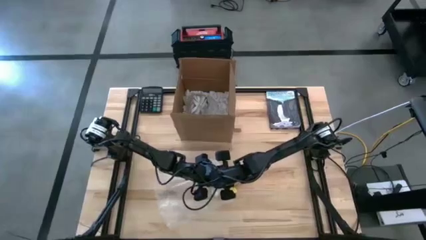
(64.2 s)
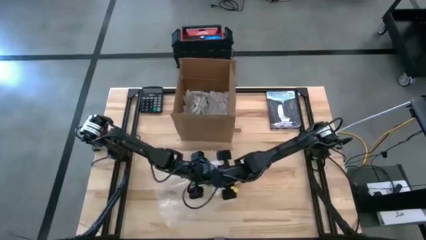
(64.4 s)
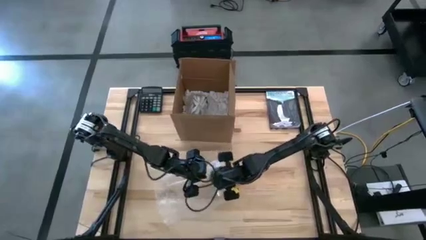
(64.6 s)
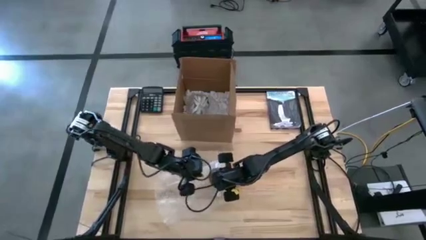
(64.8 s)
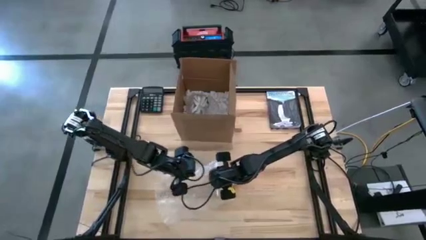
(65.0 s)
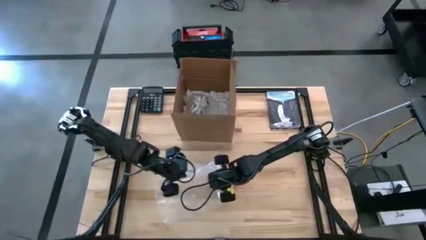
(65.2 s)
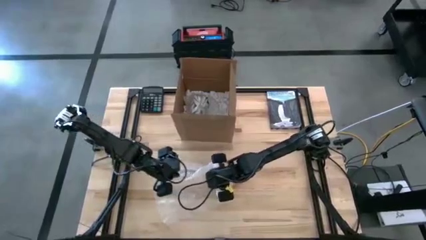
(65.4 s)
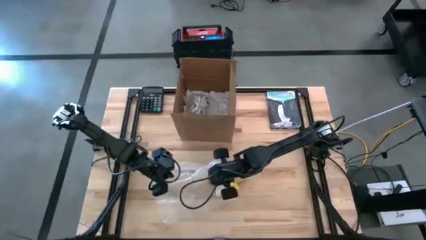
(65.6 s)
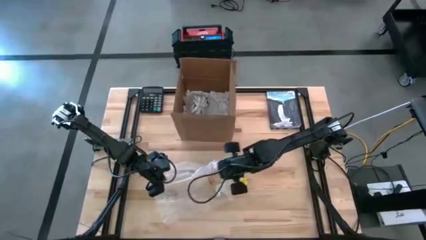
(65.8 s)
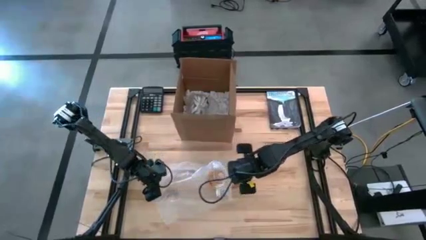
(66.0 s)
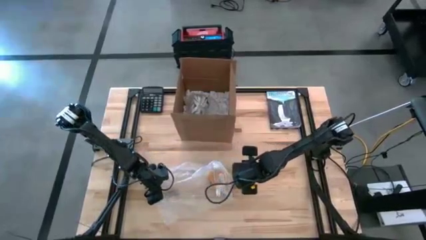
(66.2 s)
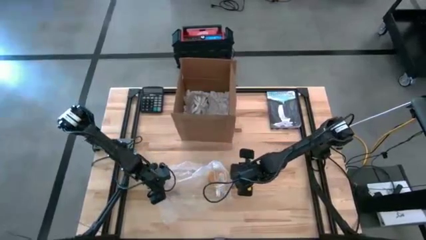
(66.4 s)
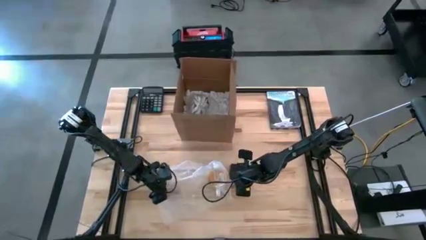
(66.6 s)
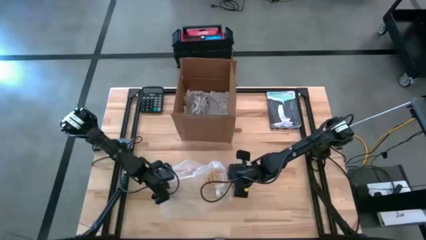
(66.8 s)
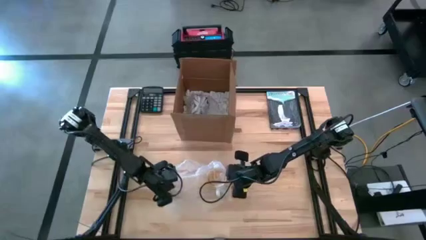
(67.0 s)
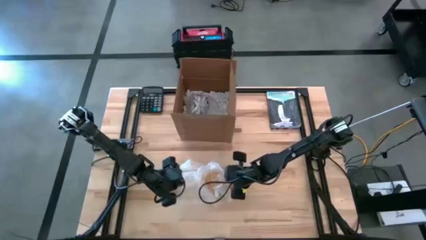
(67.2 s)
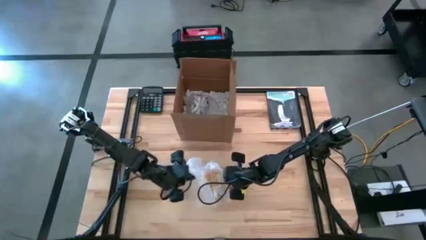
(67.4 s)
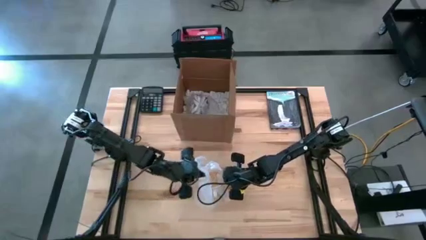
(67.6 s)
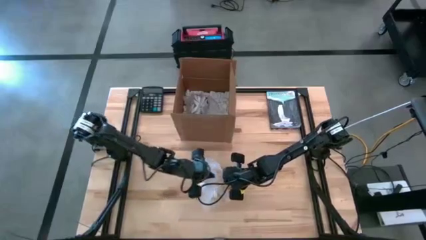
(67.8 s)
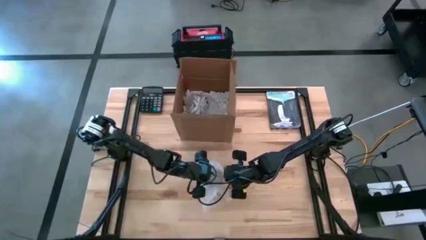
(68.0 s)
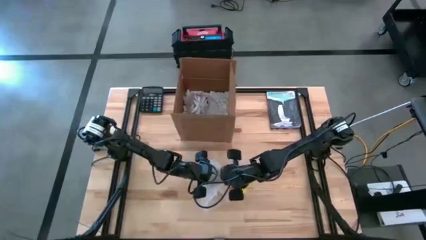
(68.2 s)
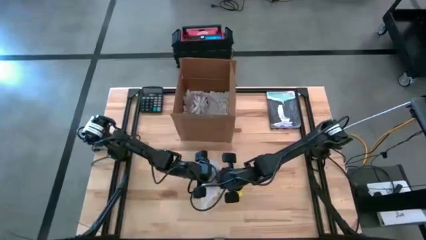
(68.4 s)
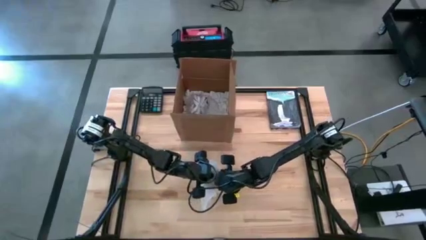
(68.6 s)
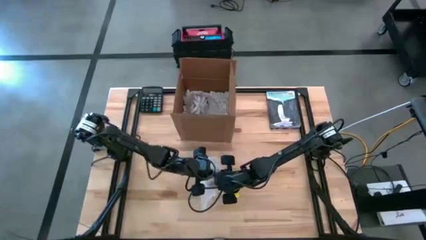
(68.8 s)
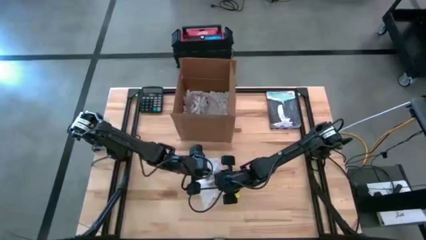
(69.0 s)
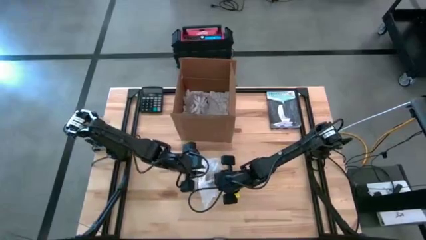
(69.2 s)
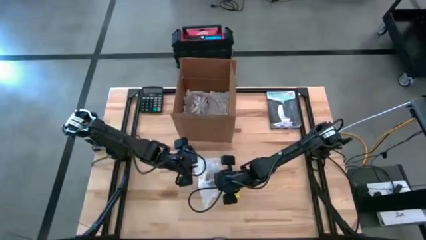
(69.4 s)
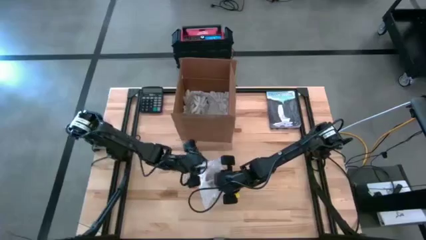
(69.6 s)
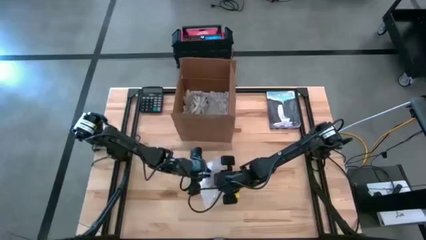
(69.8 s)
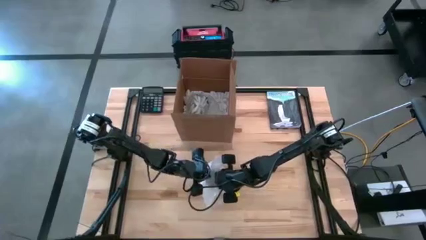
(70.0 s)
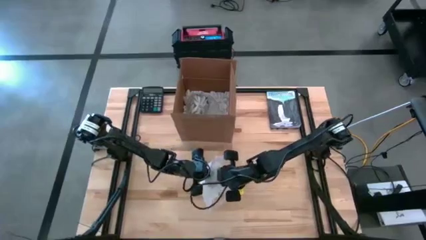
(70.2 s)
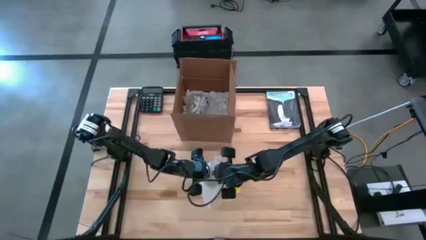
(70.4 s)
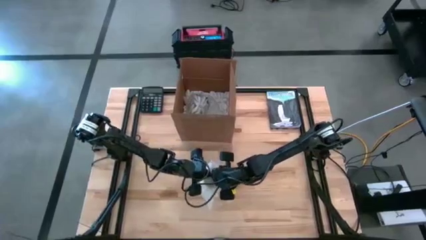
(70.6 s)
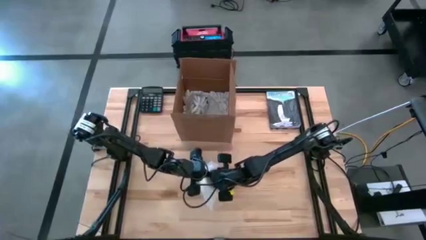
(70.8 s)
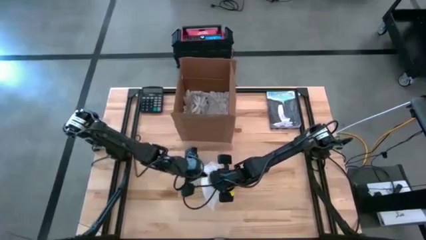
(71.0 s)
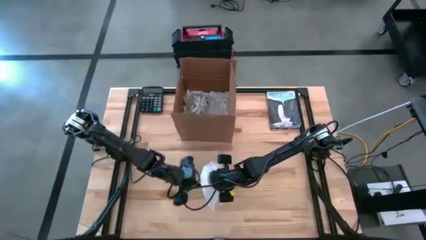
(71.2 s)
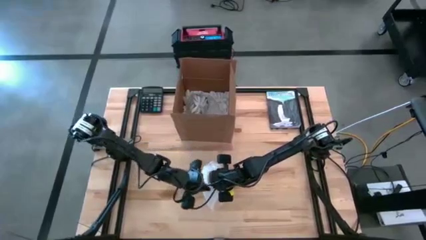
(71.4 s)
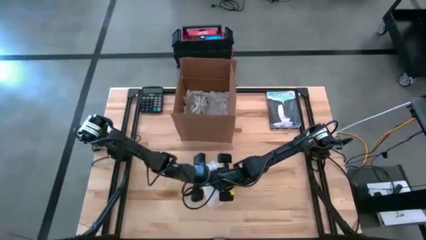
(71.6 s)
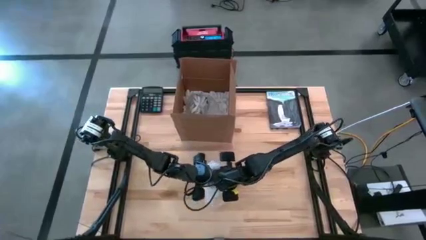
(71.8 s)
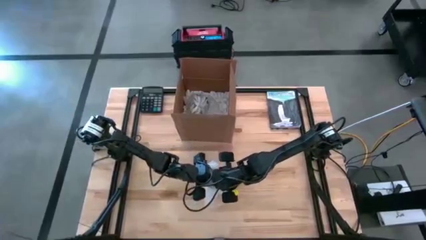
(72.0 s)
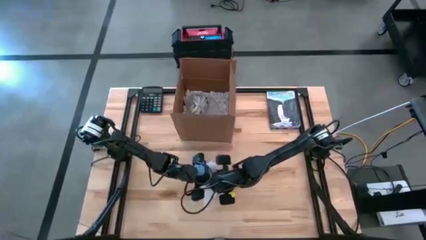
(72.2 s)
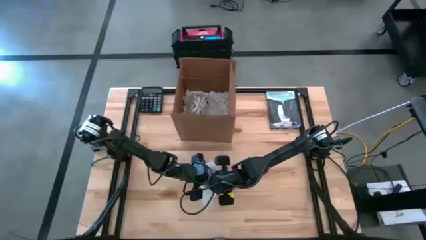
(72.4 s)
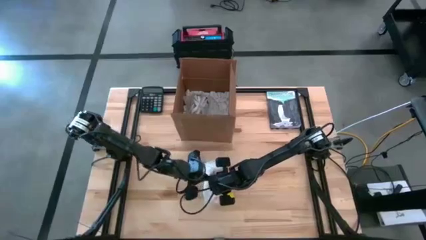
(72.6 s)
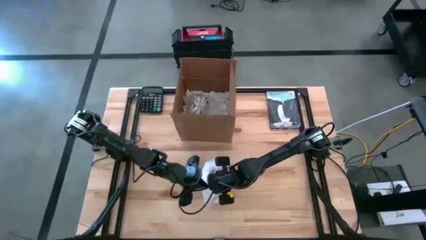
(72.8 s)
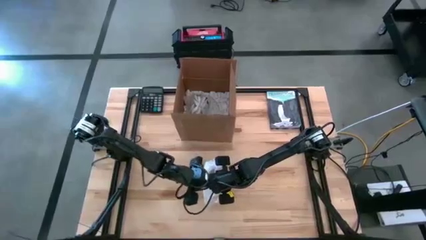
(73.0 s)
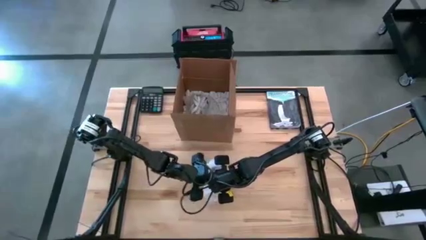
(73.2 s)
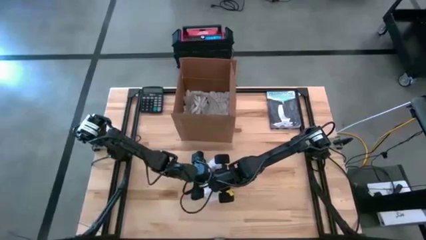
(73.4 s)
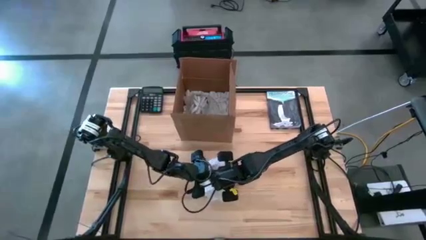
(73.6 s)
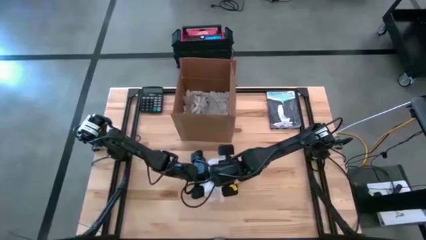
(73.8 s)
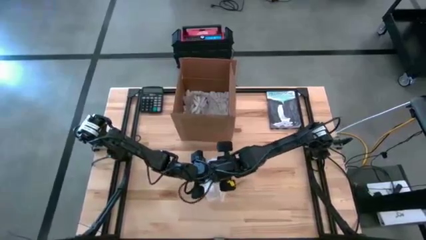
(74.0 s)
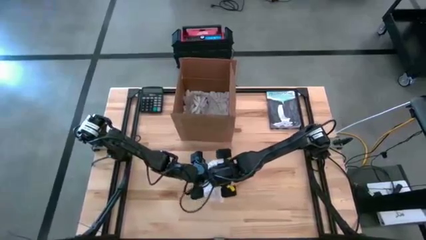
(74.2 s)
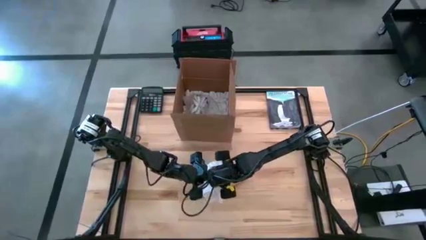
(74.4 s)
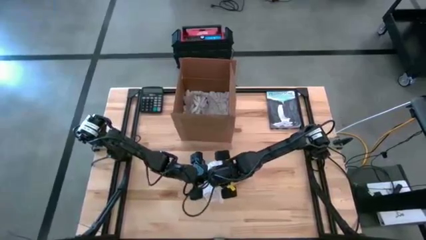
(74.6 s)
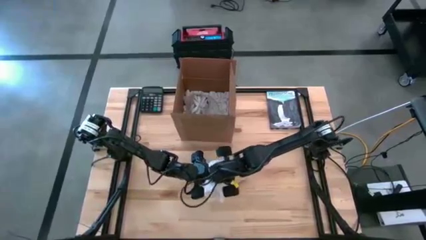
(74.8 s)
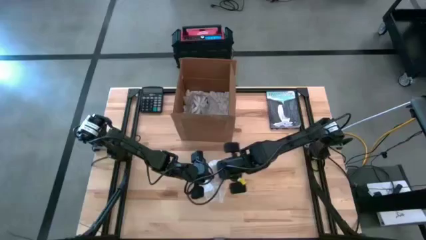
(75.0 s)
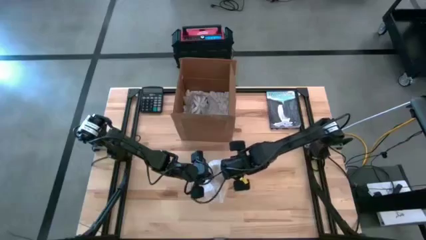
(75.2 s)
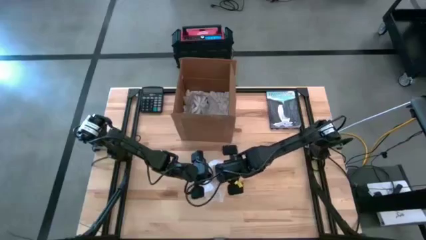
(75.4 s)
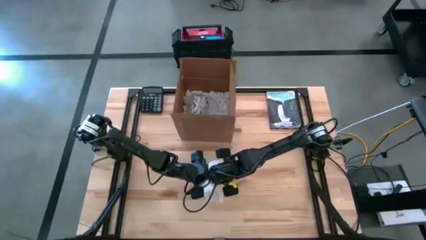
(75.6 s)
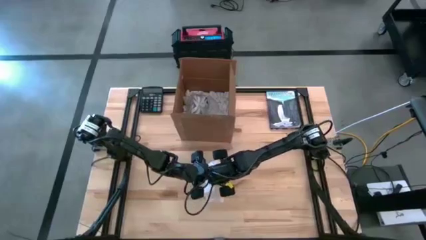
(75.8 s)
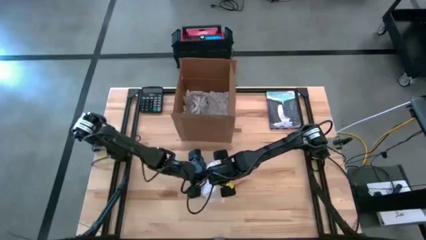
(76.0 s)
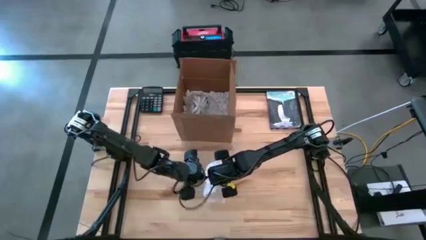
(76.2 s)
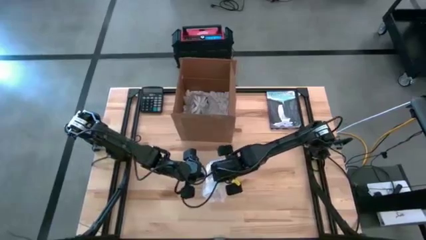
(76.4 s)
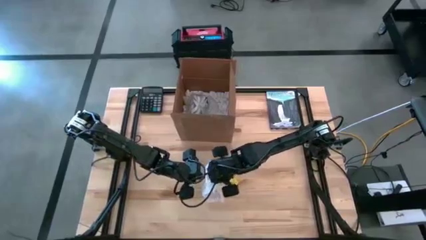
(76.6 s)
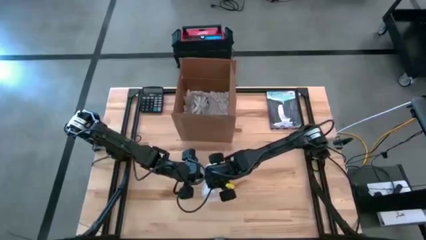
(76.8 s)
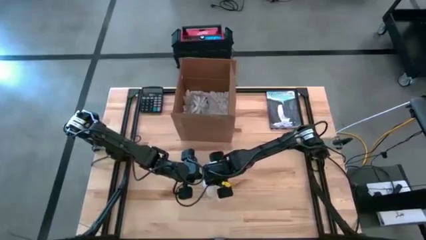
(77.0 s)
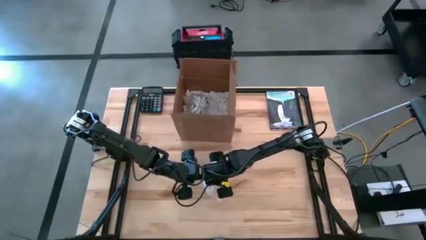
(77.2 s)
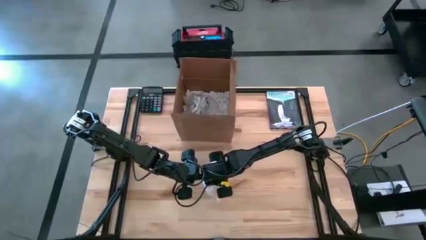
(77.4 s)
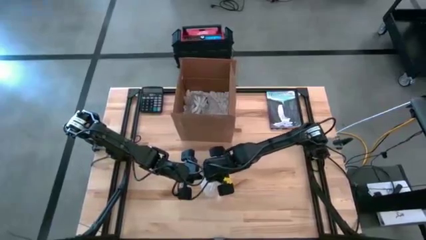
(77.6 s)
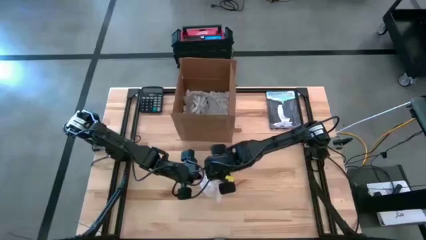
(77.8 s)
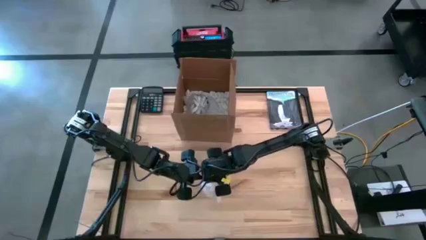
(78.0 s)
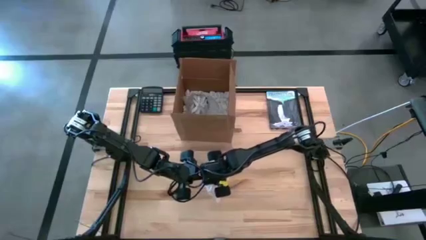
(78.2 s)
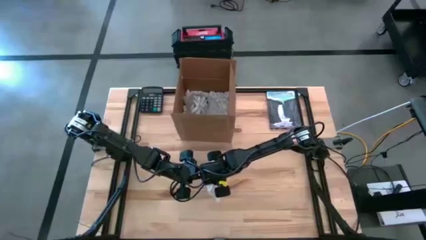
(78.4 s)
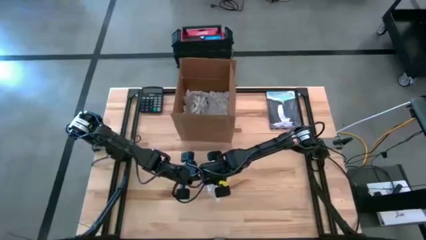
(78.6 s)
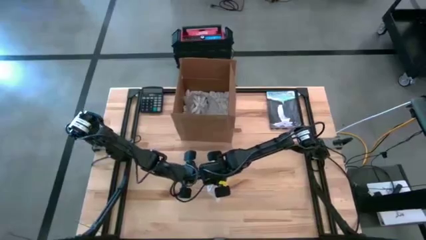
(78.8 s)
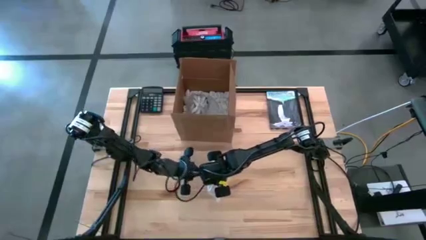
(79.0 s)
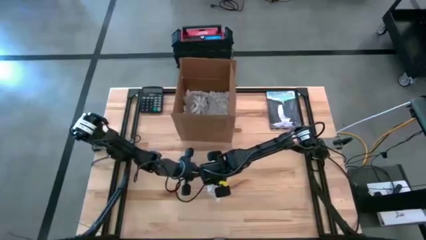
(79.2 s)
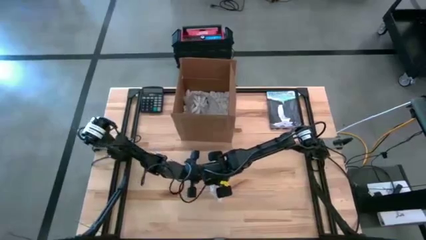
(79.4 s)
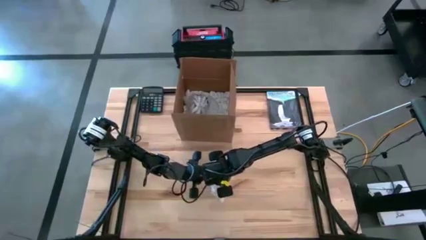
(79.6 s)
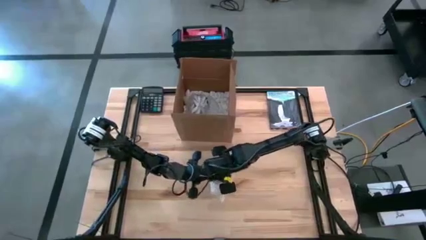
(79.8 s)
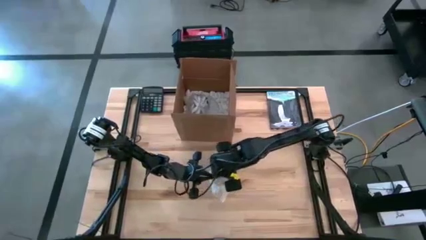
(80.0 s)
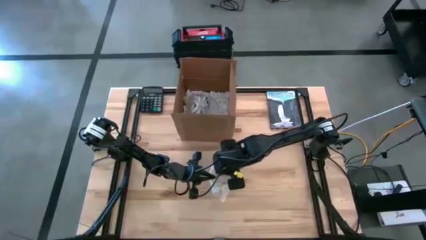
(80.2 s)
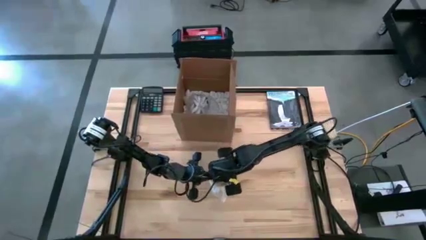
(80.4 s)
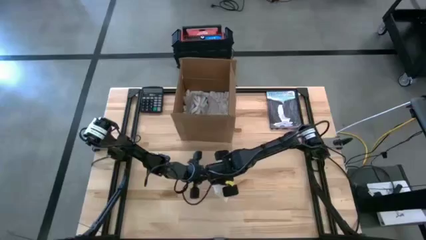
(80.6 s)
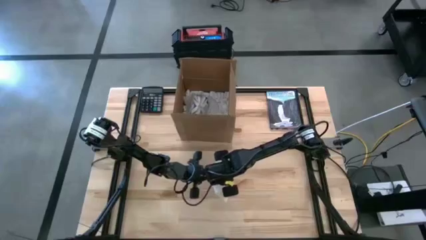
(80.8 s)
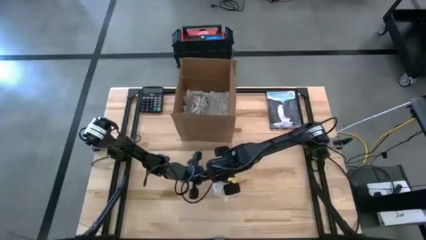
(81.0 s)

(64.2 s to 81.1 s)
Task: wrap mug
Wrap the yellow mug with bubble wrap
